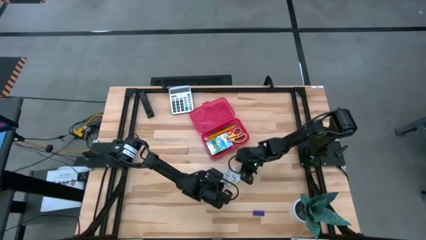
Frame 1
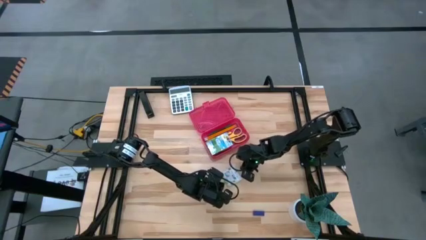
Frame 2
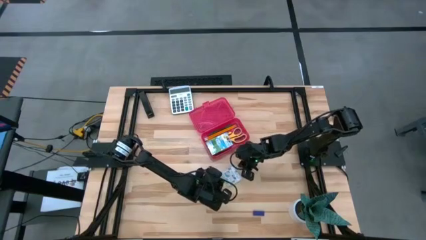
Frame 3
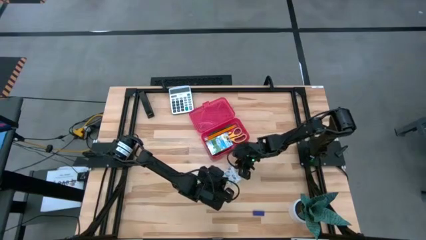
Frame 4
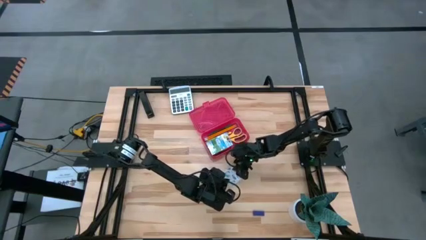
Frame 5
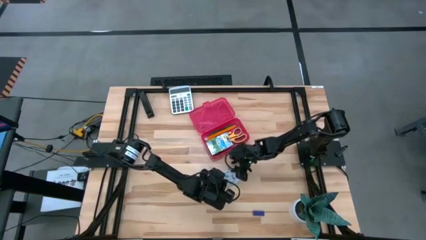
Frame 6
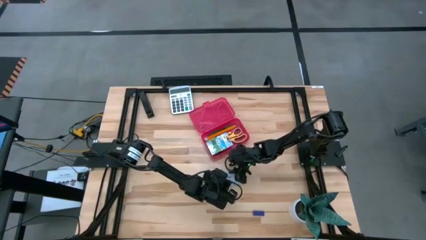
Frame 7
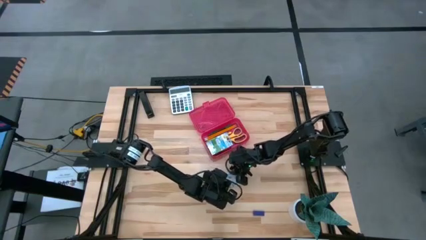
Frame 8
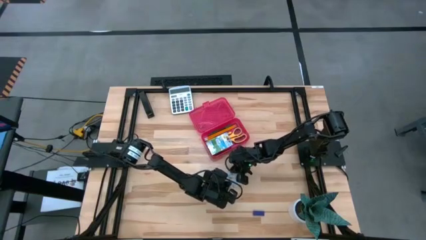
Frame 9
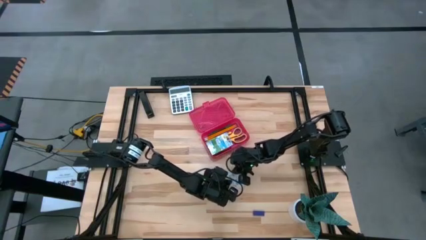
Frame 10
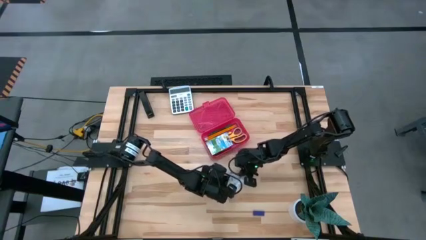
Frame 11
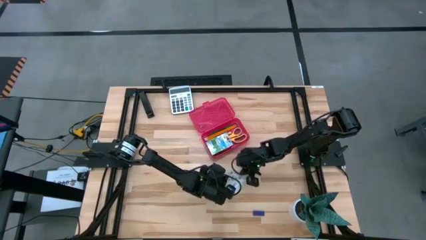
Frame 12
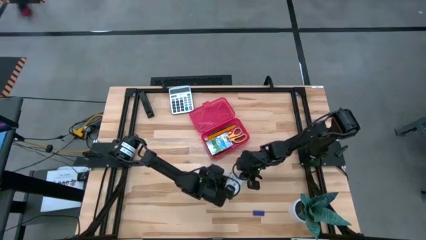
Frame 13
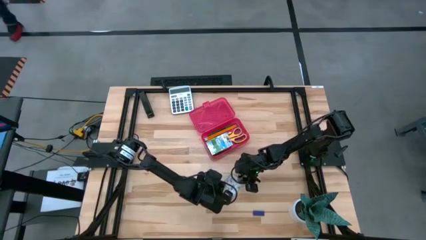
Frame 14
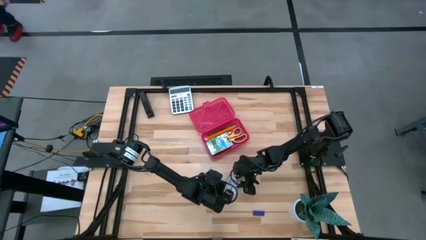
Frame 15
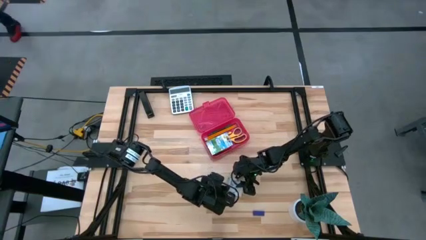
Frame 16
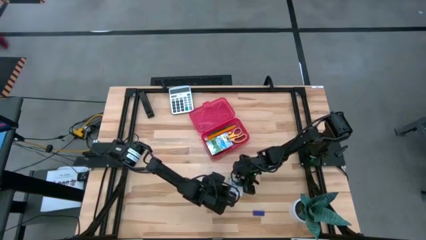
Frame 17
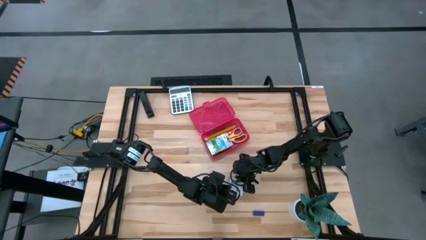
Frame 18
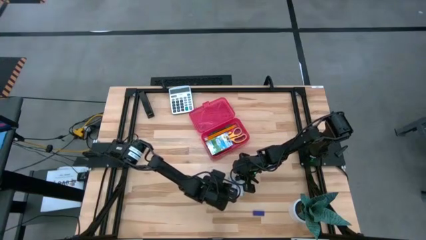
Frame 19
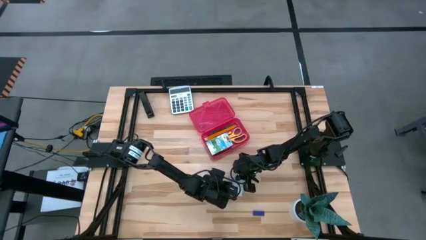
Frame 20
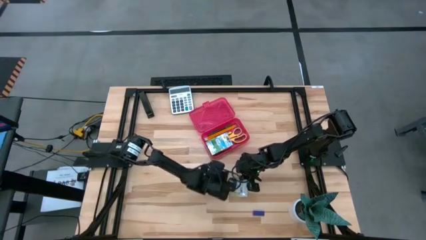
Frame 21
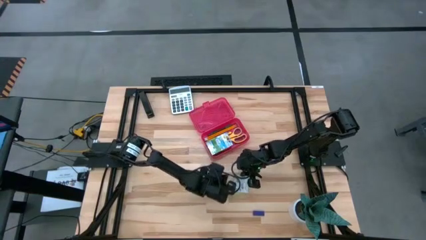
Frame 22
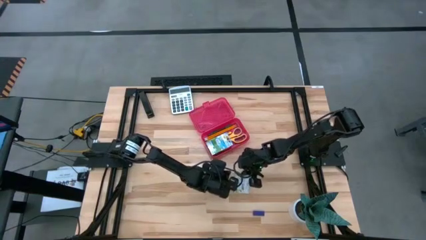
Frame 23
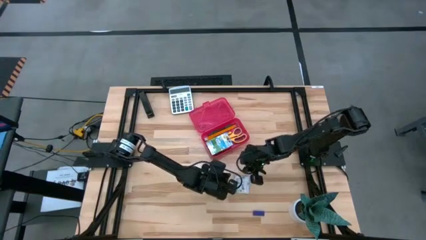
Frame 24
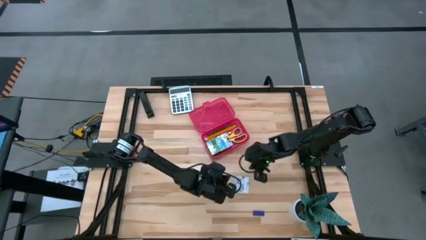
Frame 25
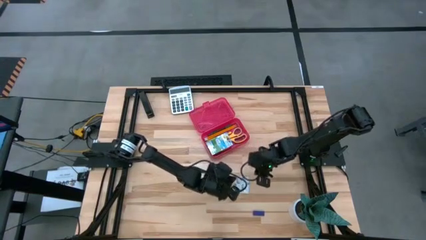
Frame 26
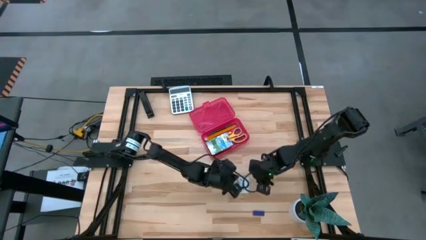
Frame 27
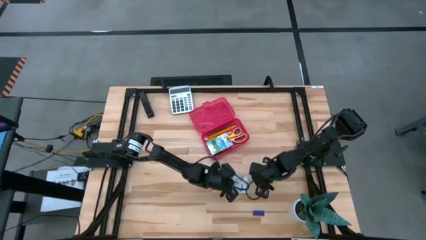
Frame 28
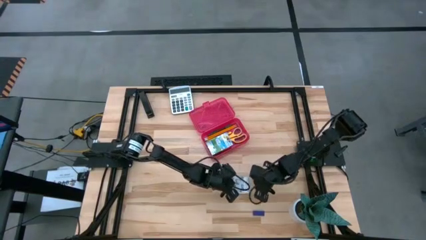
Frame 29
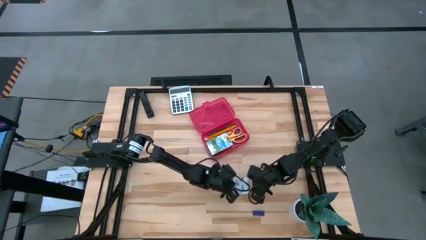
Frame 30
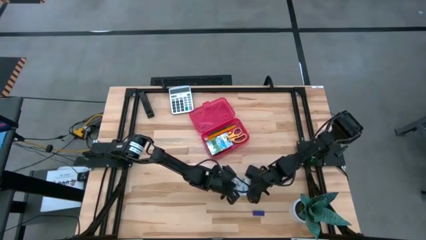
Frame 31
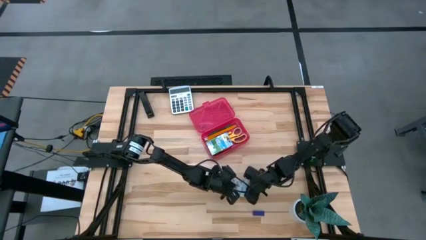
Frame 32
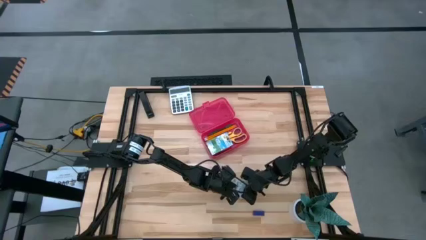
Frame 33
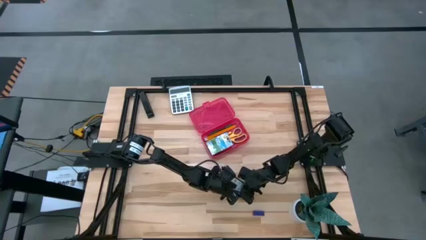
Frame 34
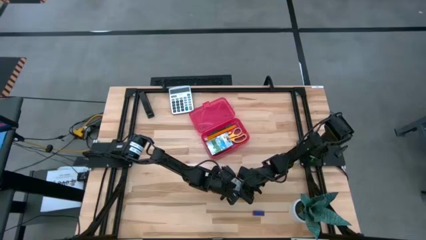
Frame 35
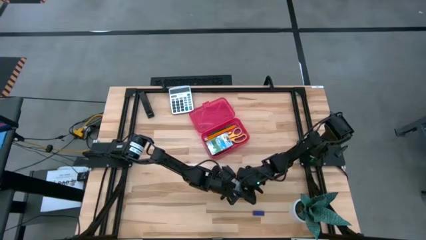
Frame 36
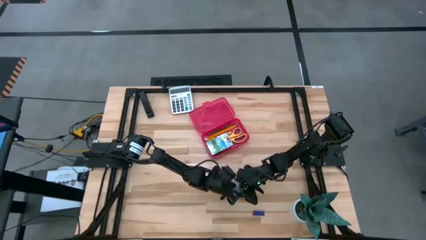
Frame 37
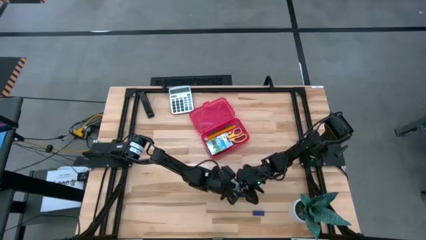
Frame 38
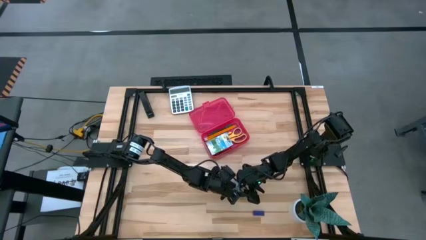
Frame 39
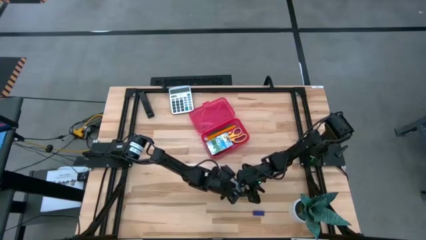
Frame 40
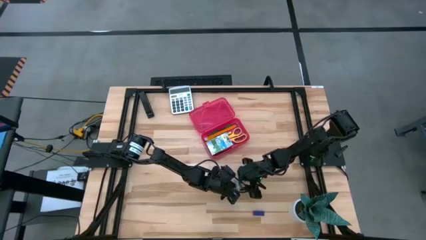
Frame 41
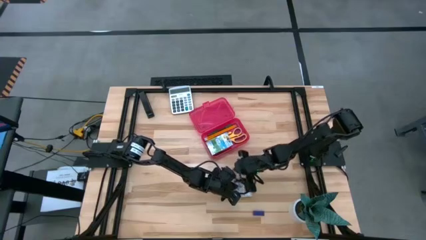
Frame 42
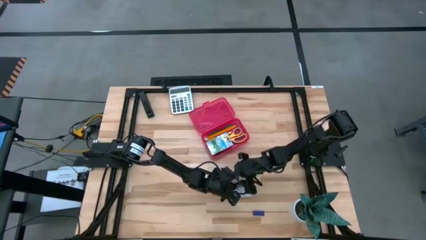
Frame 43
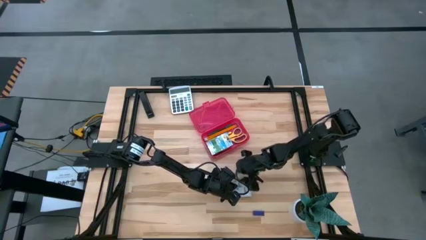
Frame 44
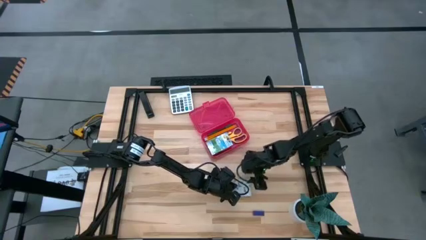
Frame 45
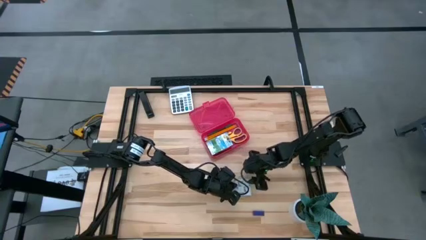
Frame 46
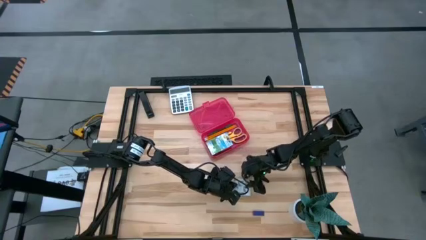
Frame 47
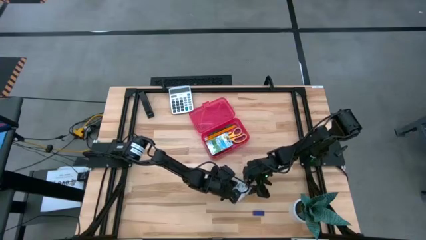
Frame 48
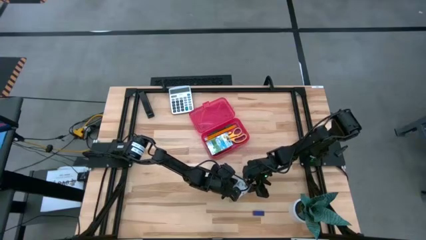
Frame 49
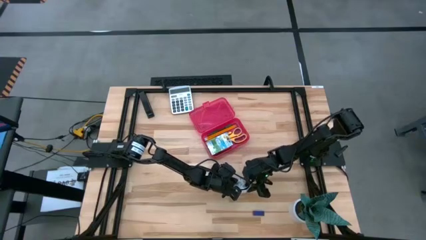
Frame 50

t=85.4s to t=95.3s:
Task: Pack school essentials
Put the green sticky notes into the red supply box

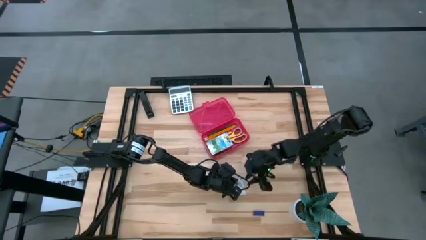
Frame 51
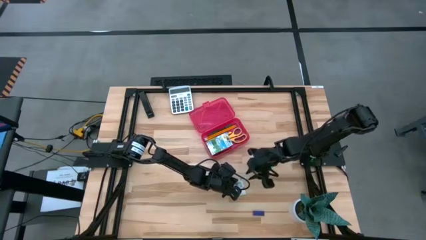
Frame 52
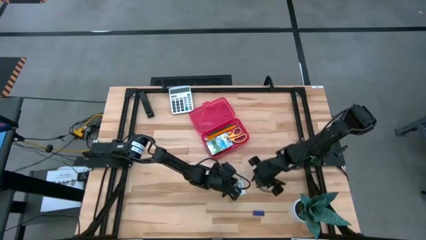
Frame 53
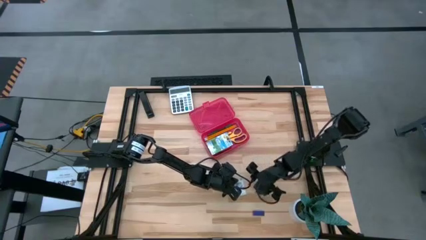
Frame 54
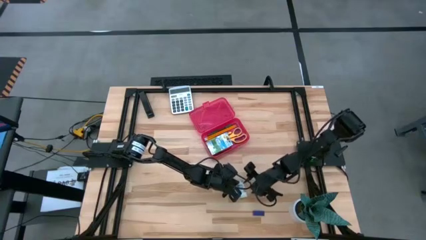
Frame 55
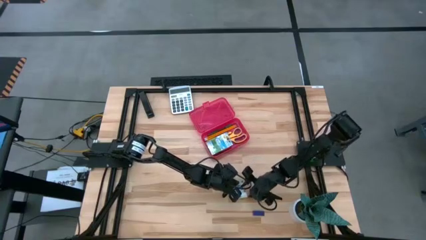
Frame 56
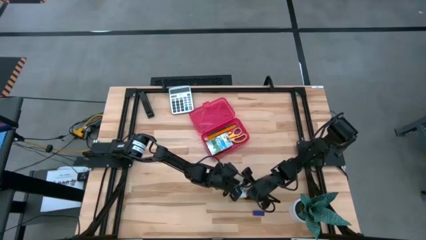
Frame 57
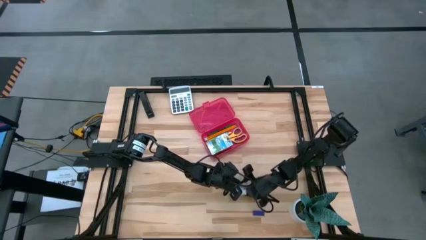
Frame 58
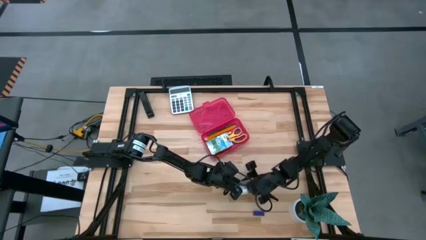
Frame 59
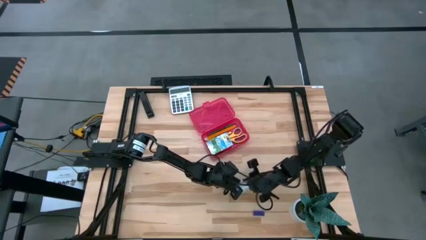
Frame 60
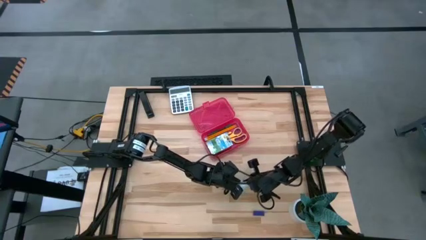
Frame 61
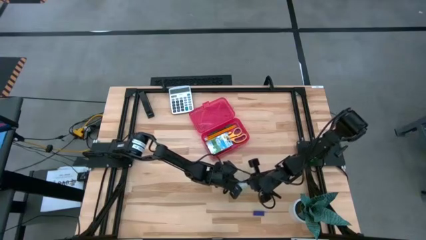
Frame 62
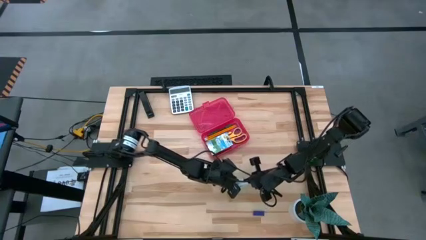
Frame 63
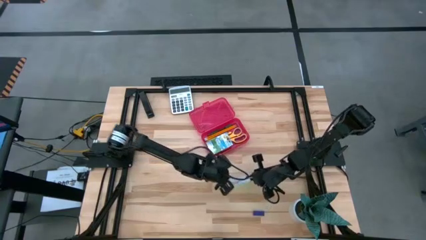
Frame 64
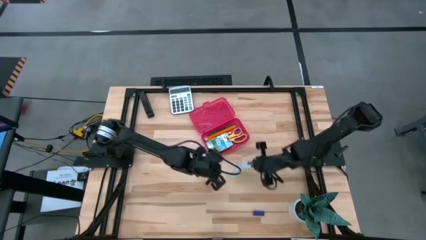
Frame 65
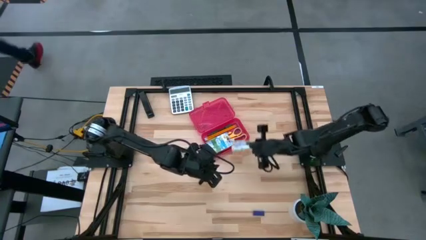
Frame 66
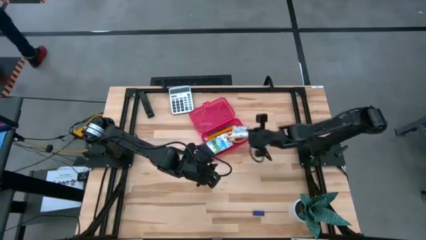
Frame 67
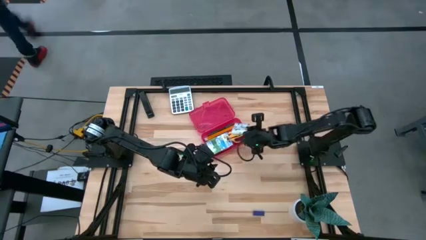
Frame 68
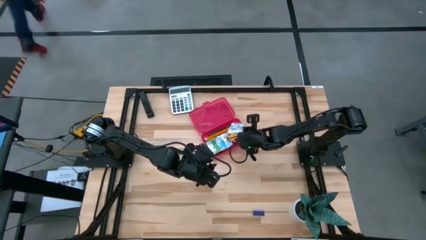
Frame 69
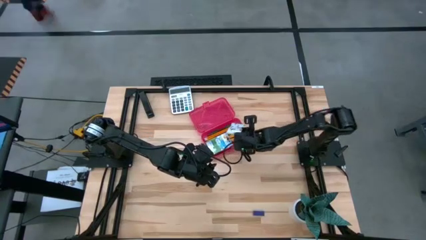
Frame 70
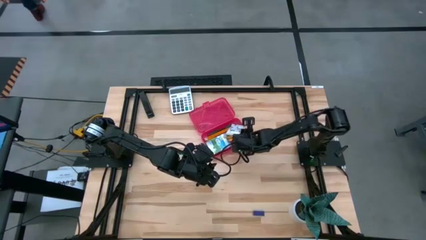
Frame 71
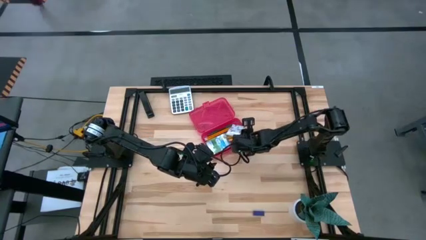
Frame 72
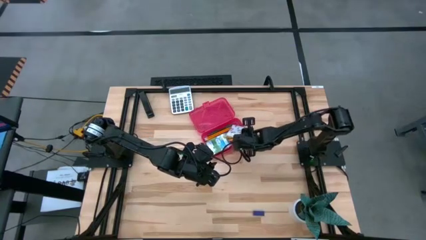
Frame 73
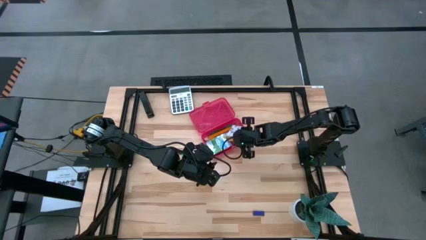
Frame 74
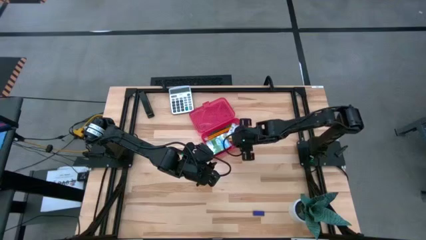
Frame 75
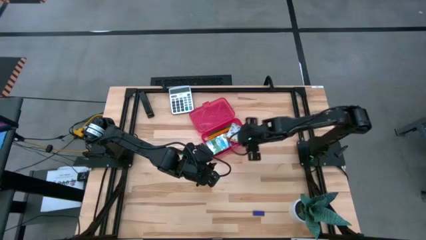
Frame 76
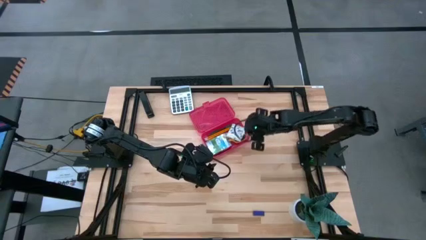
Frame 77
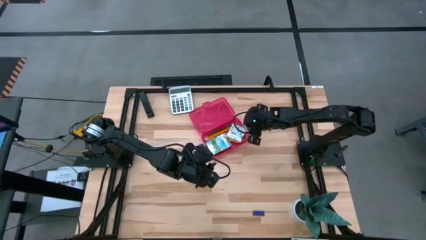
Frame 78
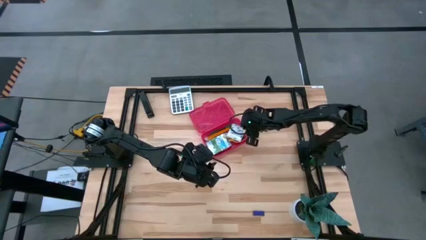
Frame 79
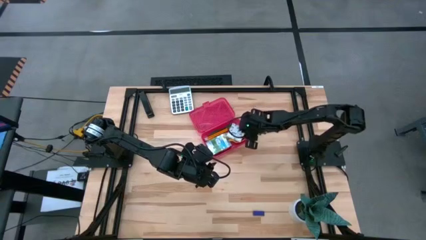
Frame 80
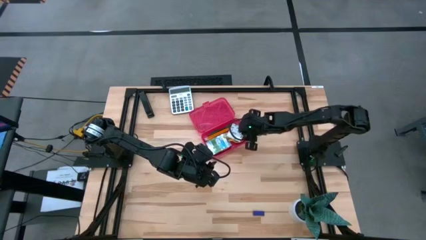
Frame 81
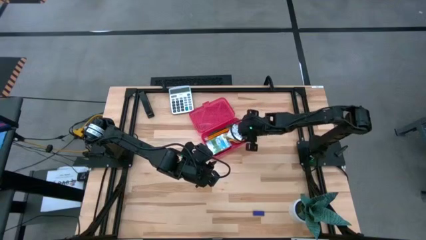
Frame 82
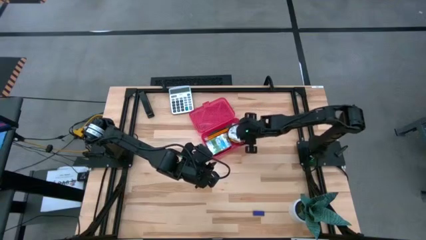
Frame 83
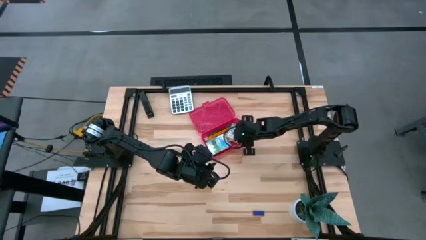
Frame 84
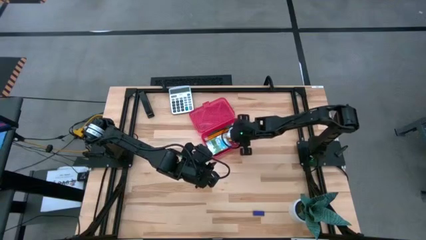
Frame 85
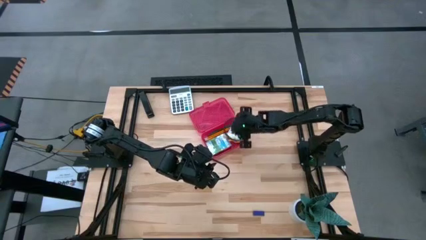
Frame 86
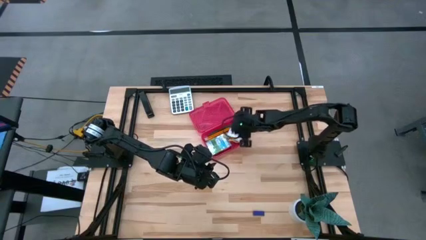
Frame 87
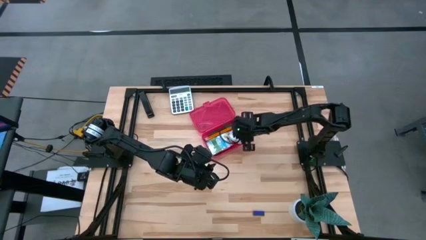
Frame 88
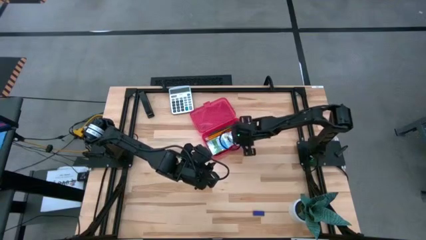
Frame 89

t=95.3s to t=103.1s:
Put the green sticky notes into the red supply box
